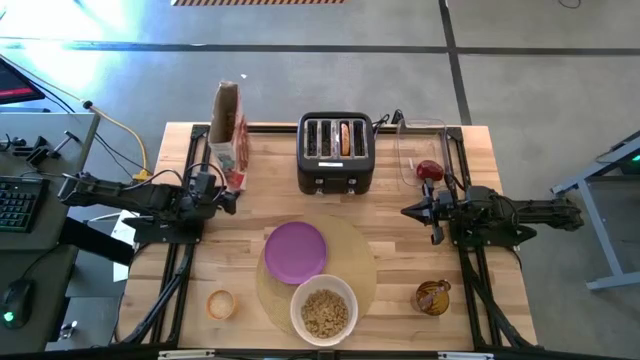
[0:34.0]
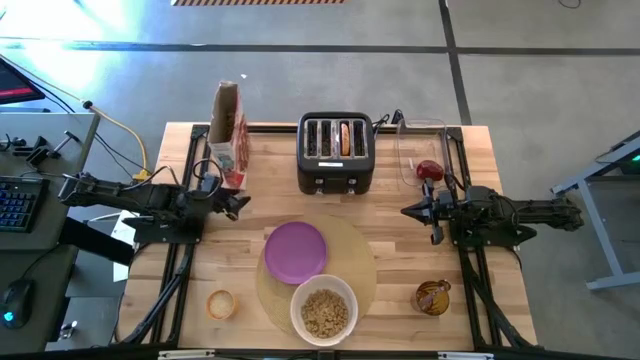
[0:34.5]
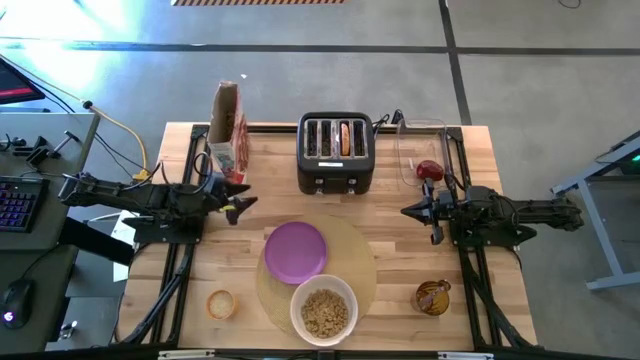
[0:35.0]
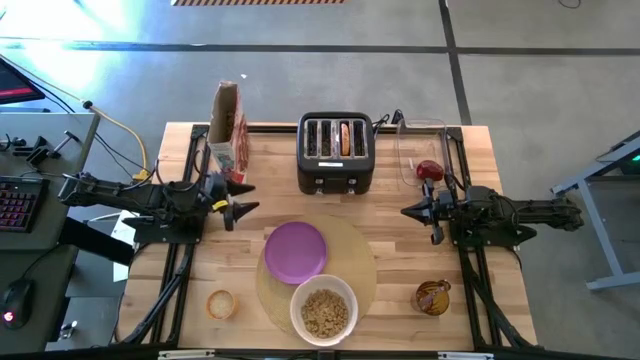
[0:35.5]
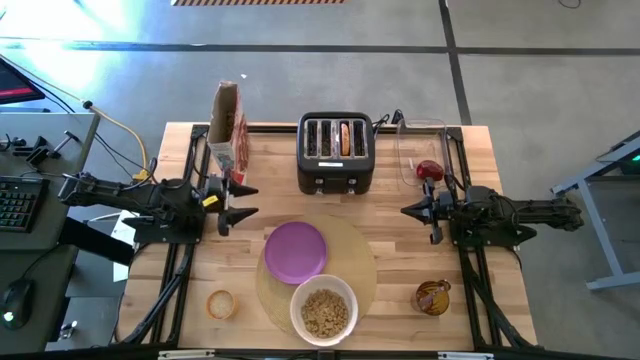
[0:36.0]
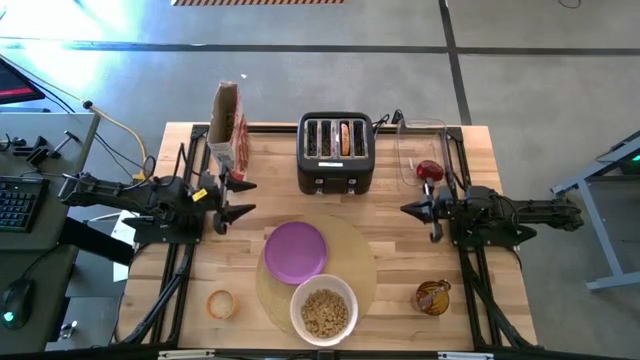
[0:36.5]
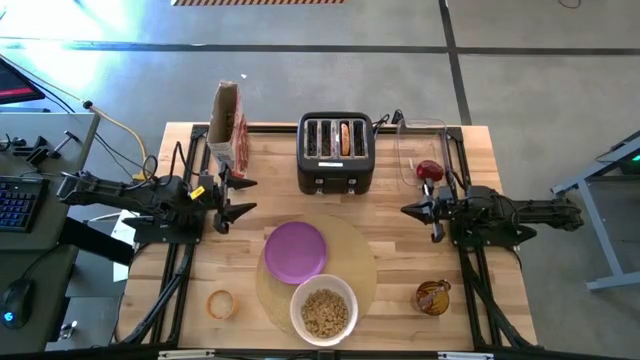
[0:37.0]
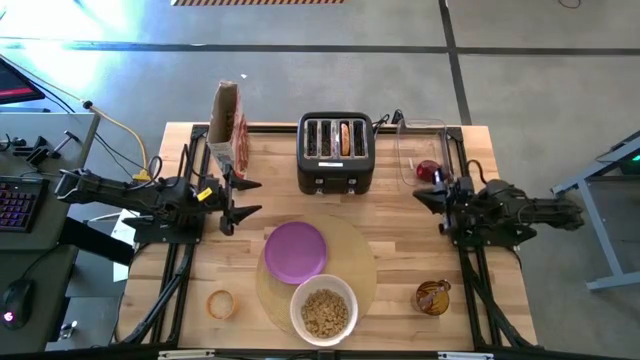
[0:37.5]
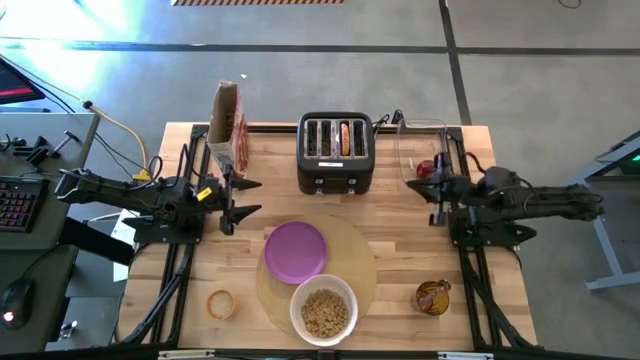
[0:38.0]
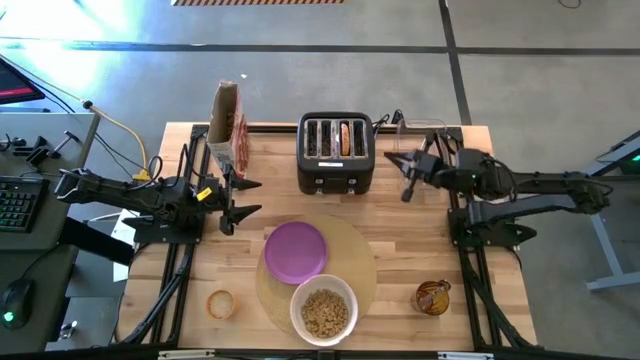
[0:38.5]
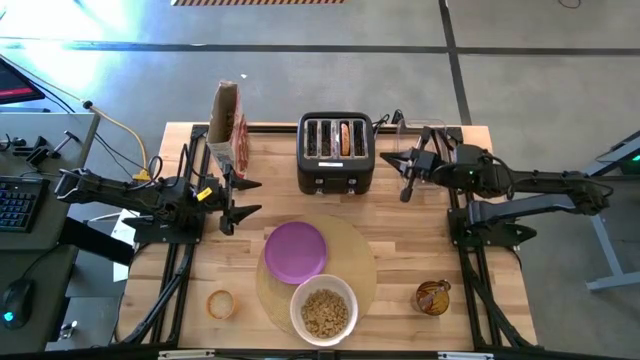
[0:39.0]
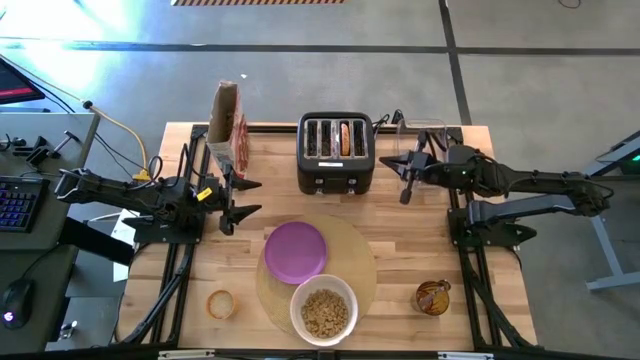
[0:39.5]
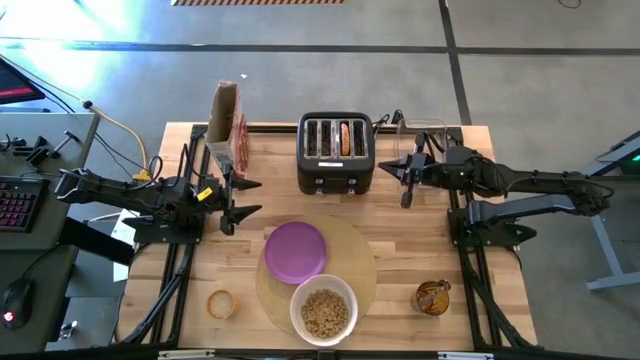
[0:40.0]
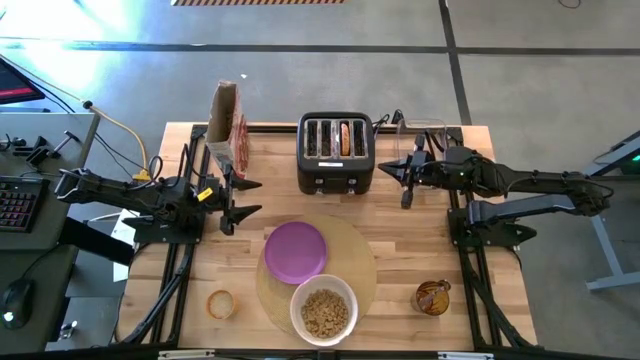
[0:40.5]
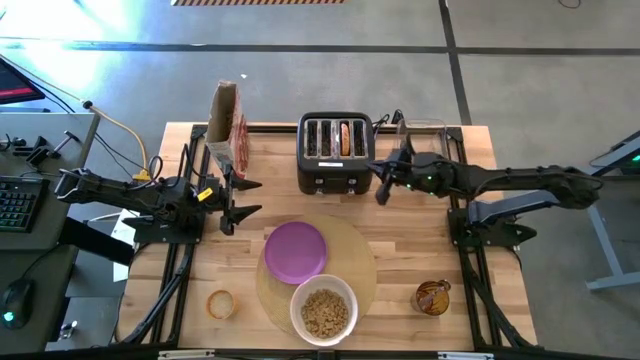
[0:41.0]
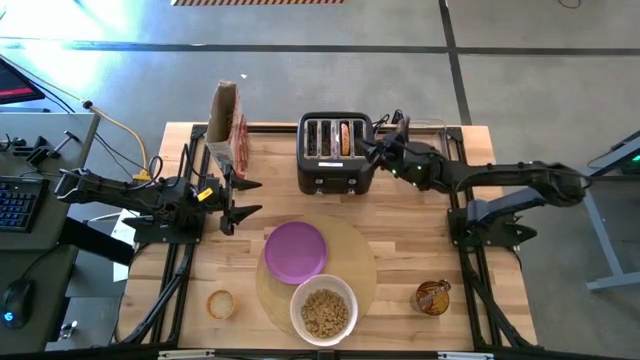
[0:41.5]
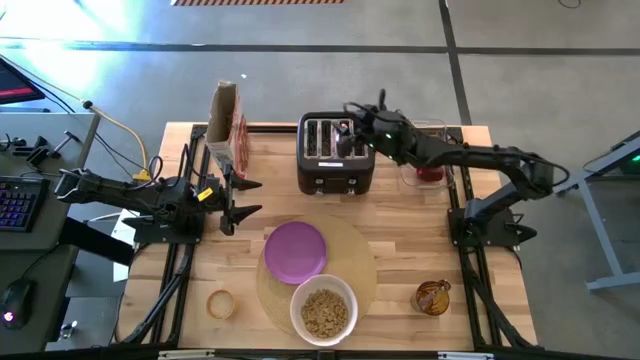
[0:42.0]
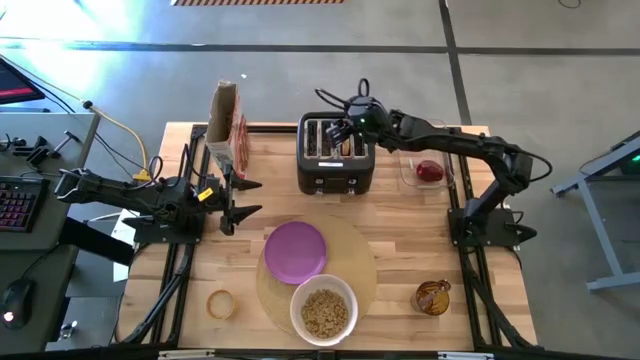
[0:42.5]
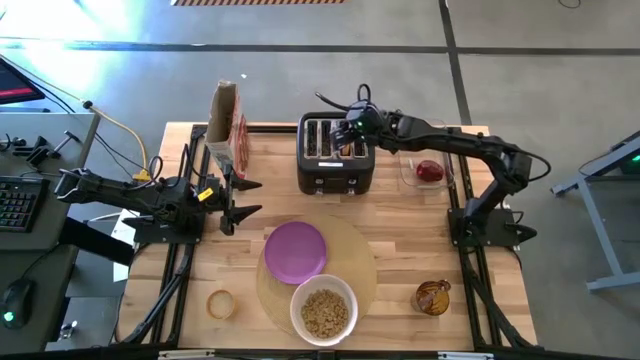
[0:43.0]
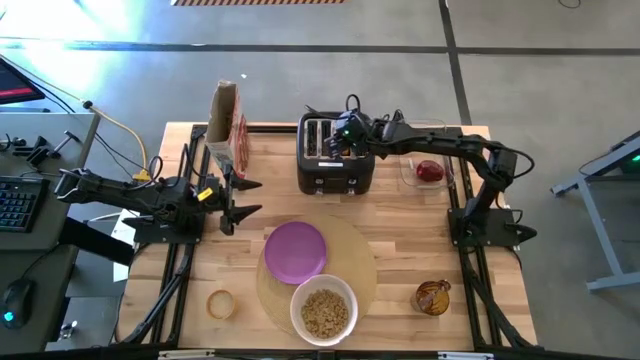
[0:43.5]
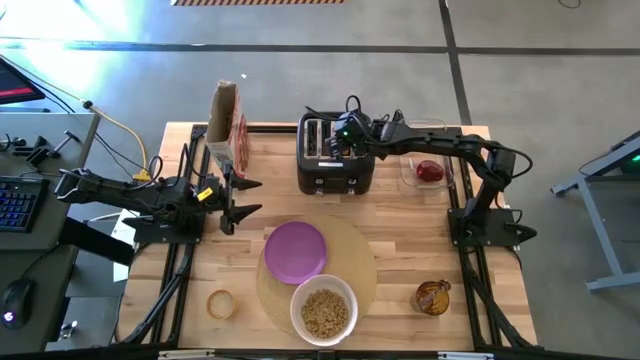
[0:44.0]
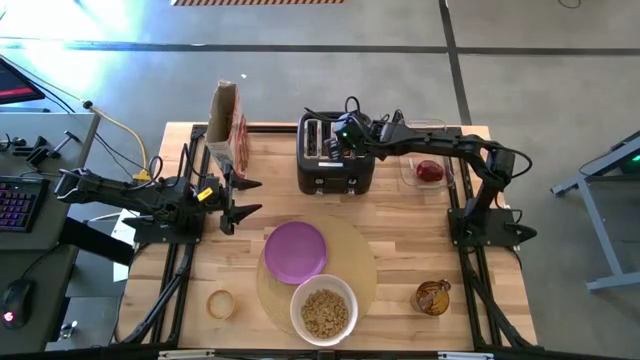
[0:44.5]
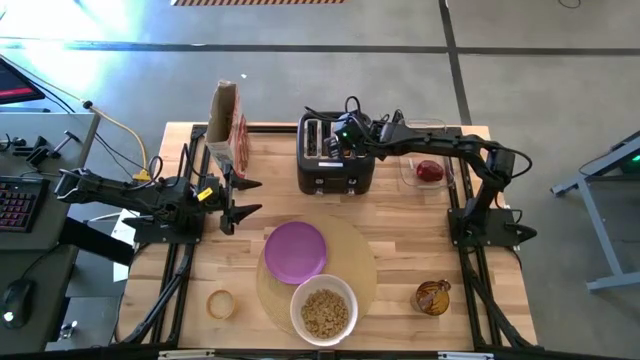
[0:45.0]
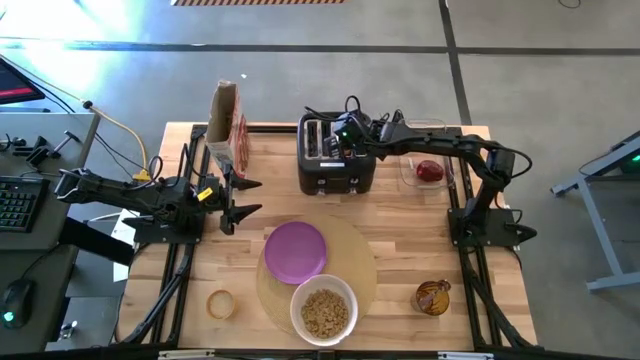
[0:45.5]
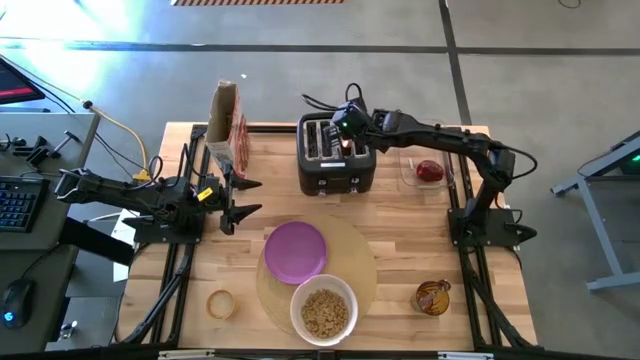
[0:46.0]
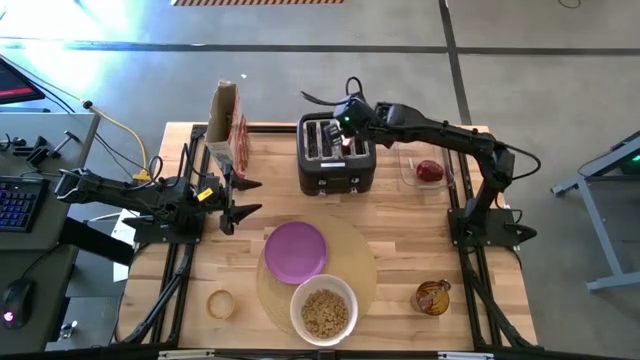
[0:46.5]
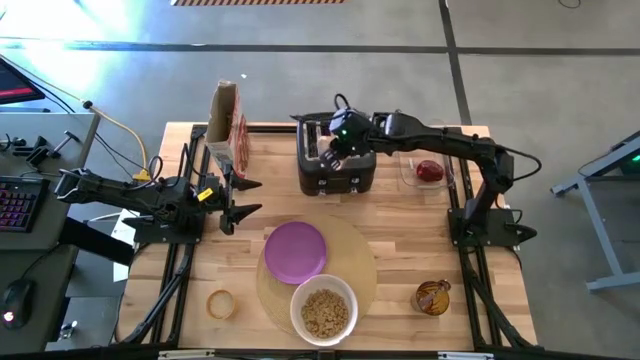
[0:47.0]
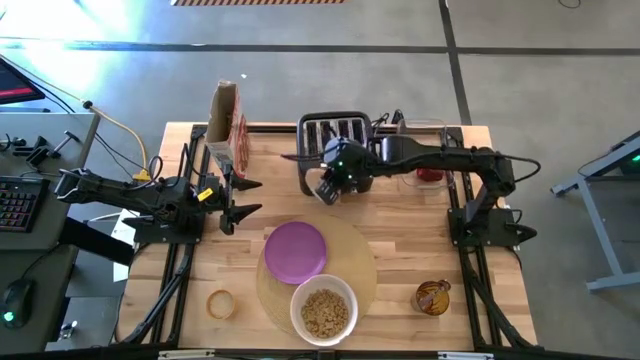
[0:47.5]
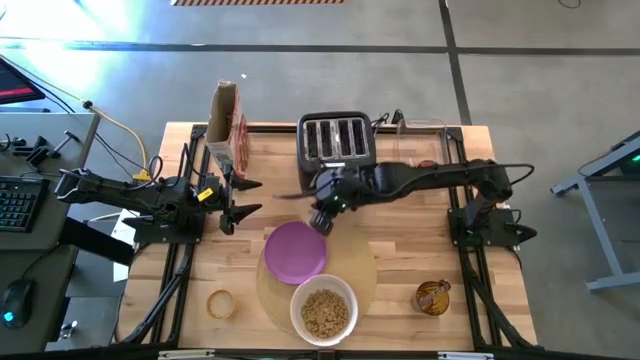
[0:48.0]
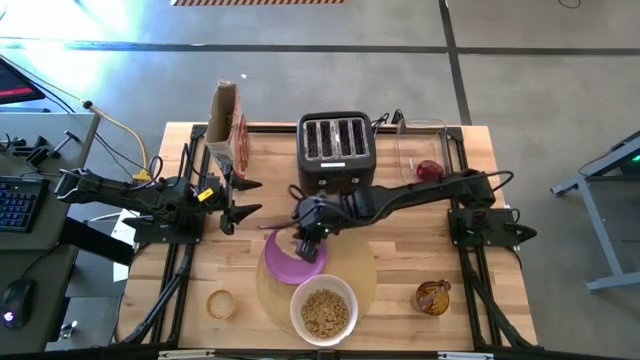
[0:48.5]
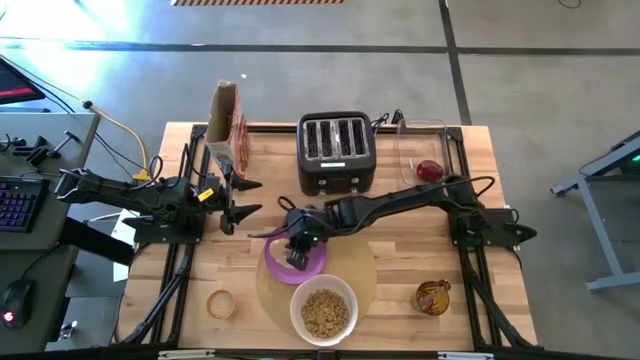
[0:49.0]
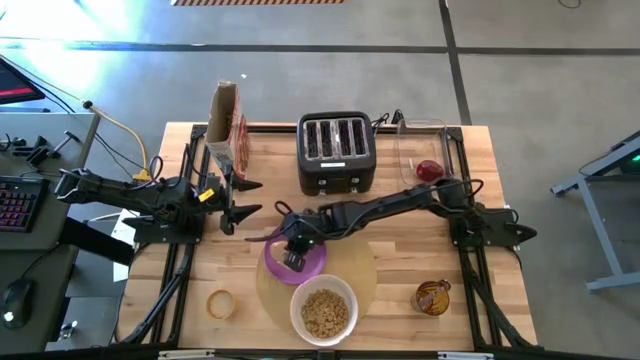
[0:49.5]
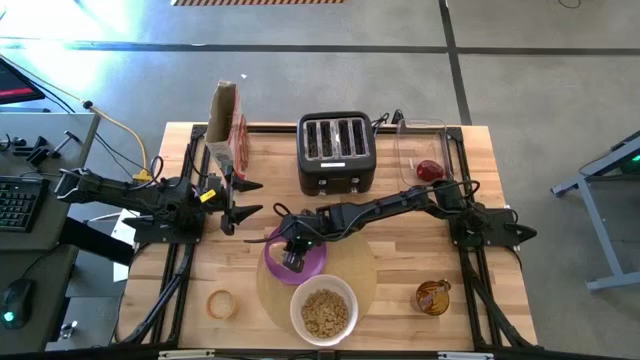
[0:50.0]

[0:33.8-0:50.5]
Task: Arrange a breakfast setting
Put the toasted bread on the violet plate

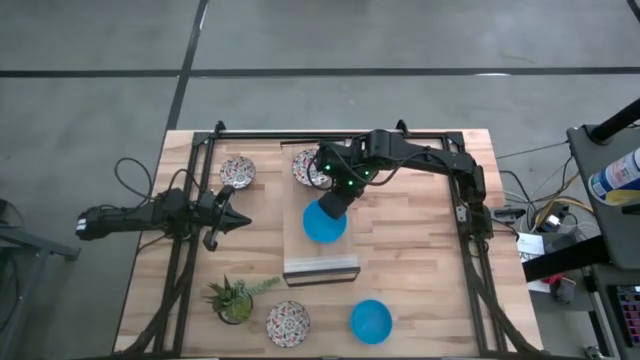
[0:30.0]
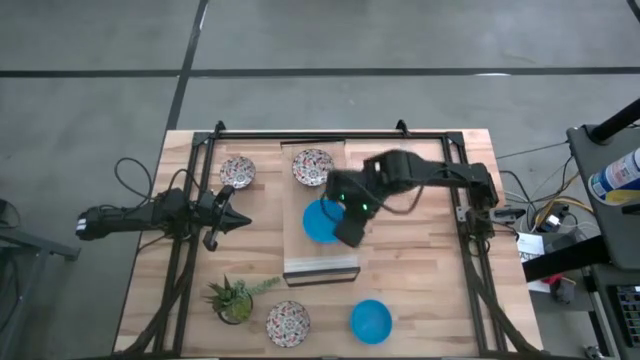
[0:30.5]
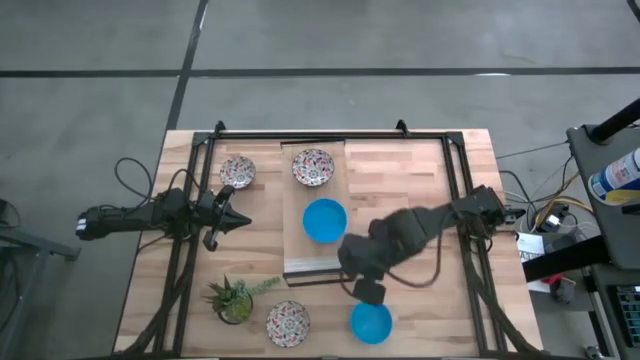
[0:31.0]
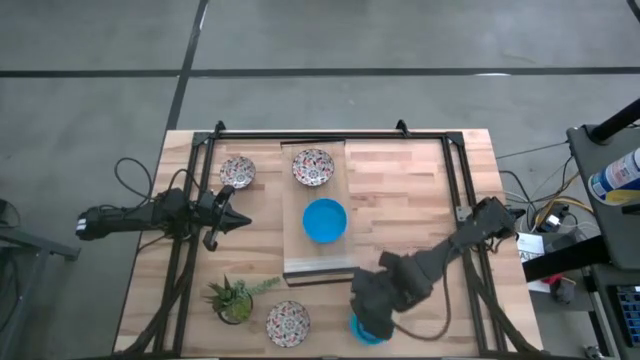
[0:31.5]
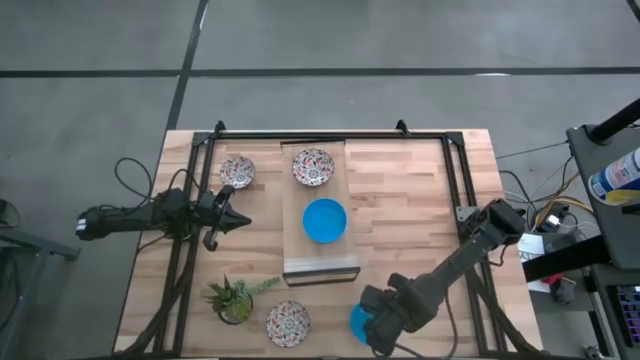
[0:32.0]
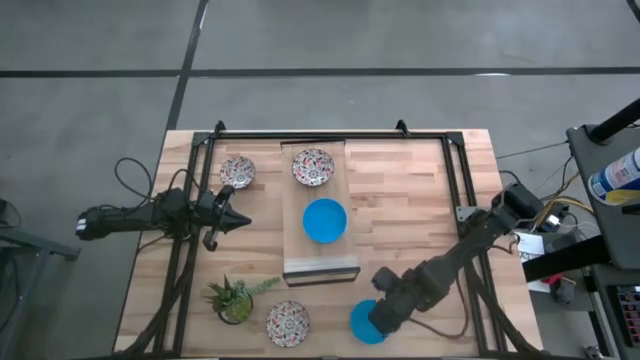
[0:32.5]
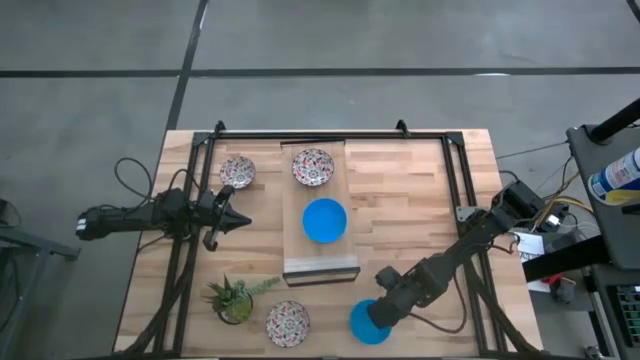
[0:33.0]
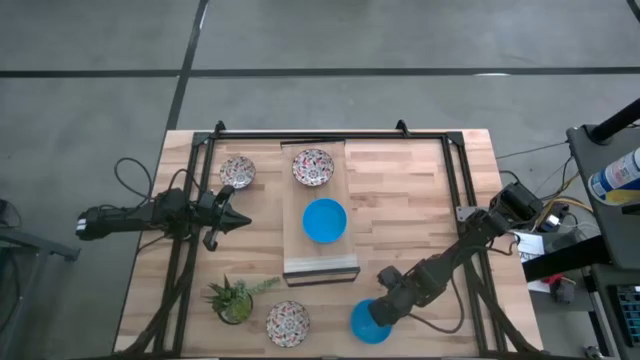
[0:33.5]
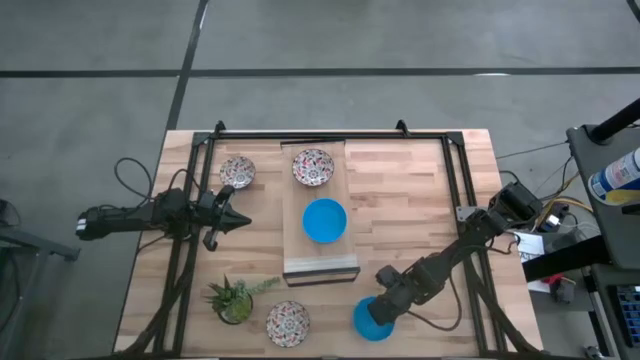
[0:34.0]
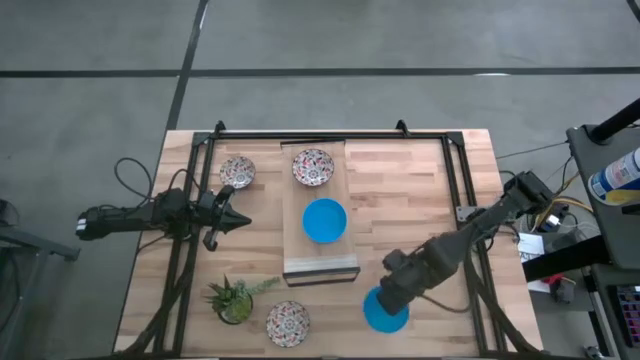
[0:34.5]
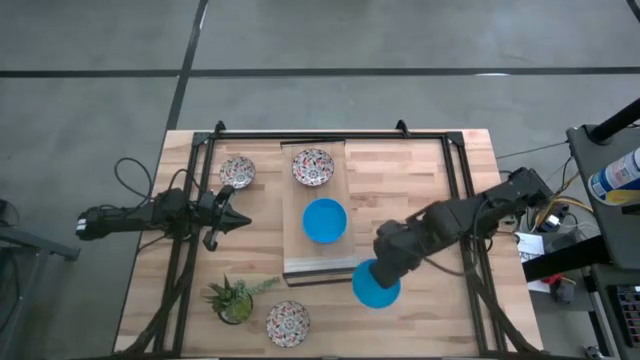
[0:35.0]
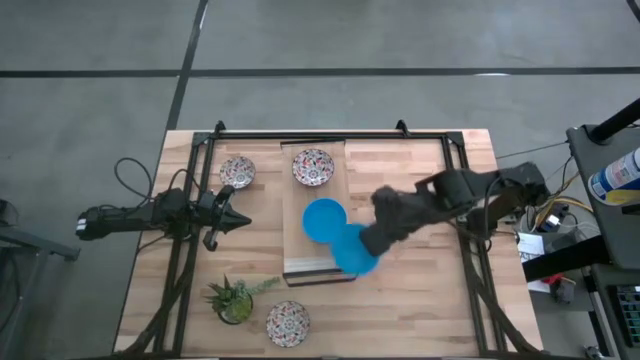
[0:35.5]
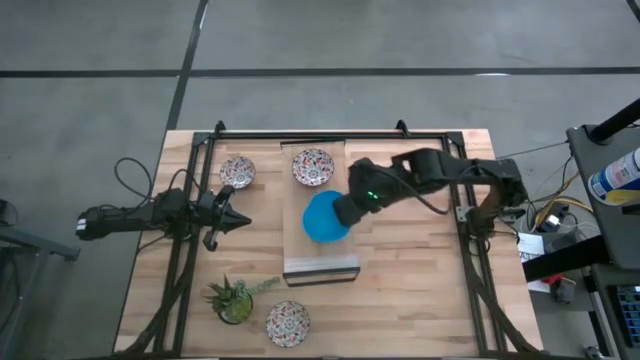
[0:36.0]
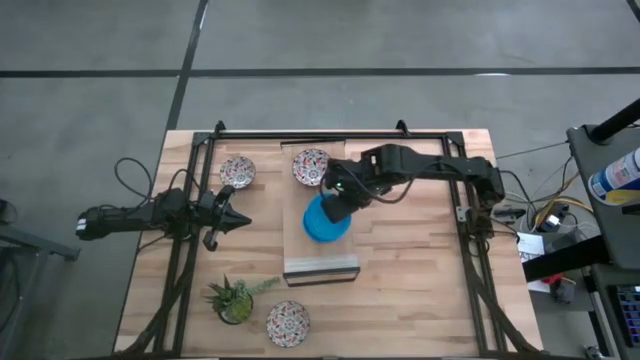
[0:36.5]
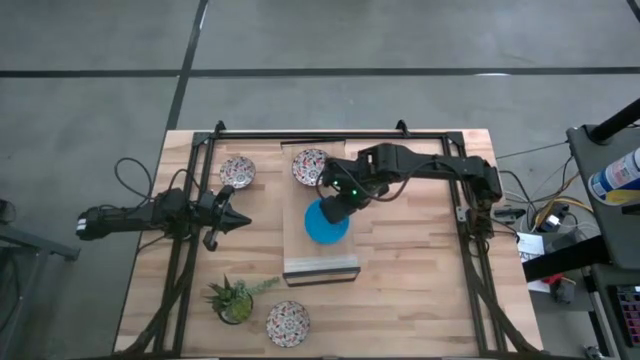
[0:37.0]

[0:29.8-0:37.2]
Task: Pick & Place Mini bowls
Stack the blue bowl on top of the blue bowls on the shelf
